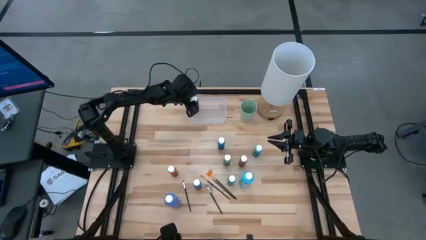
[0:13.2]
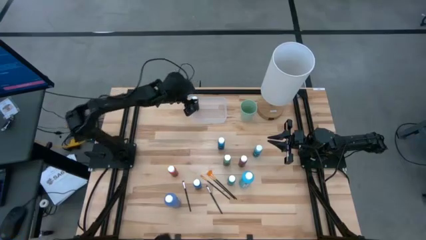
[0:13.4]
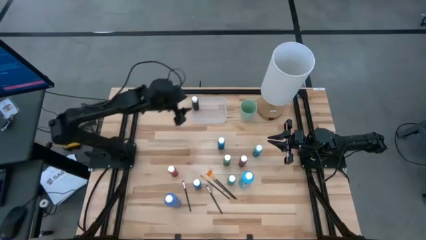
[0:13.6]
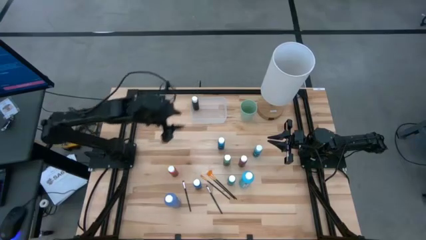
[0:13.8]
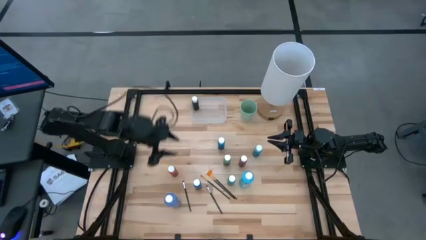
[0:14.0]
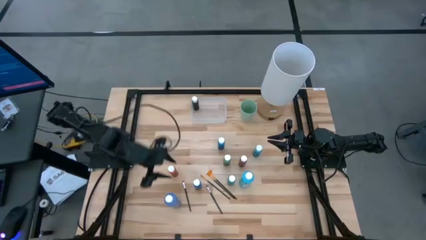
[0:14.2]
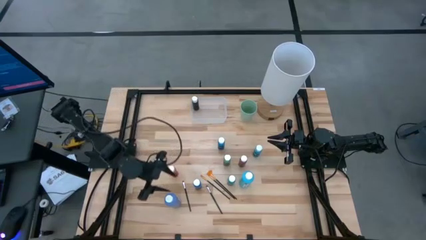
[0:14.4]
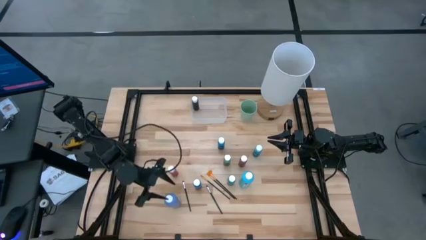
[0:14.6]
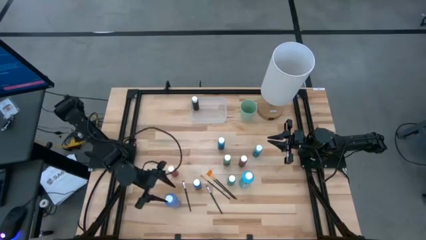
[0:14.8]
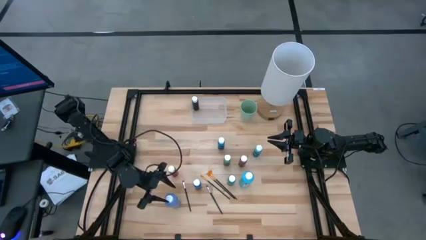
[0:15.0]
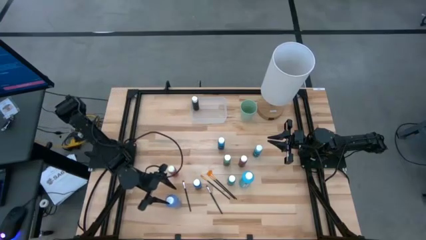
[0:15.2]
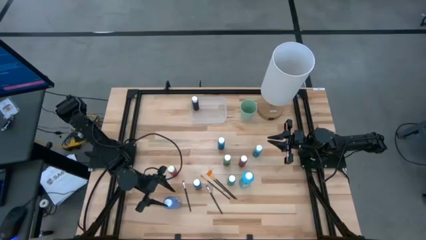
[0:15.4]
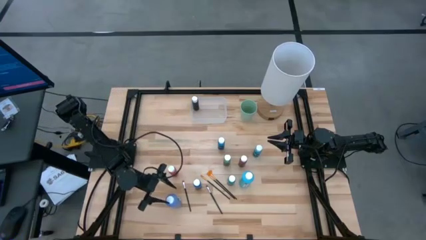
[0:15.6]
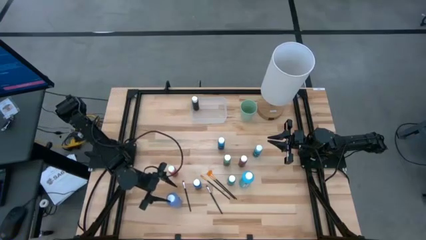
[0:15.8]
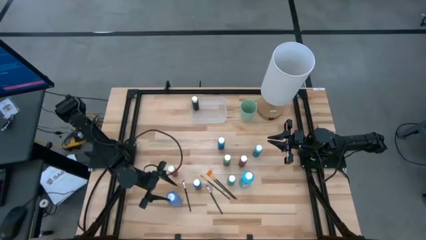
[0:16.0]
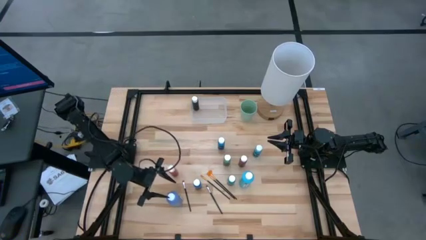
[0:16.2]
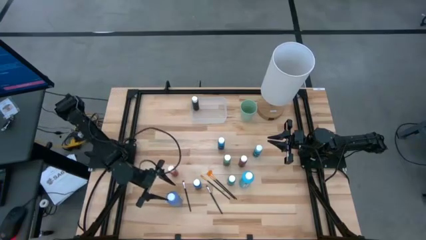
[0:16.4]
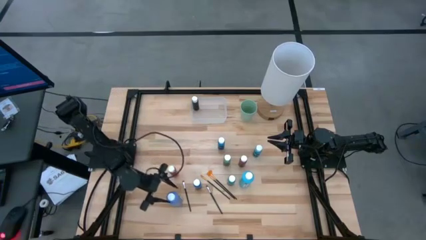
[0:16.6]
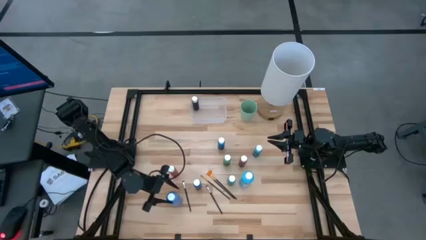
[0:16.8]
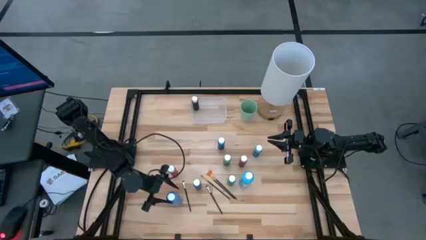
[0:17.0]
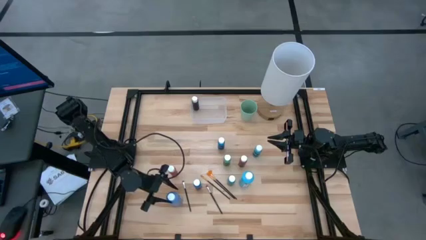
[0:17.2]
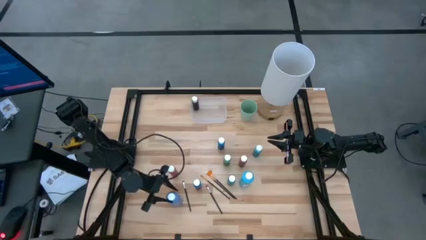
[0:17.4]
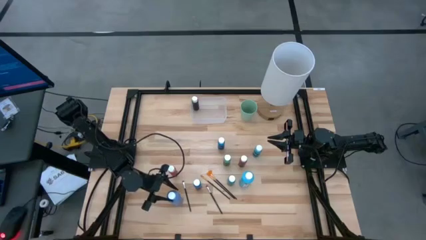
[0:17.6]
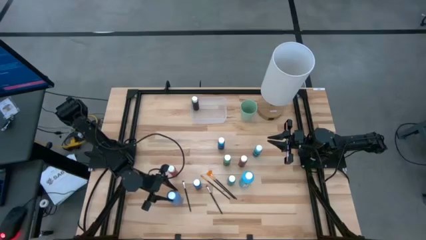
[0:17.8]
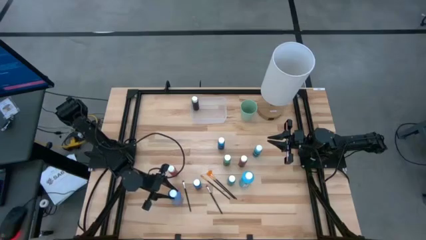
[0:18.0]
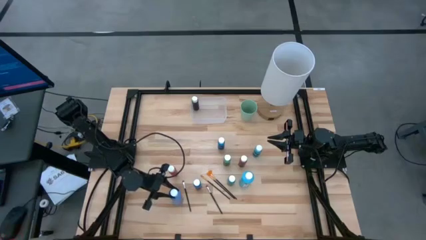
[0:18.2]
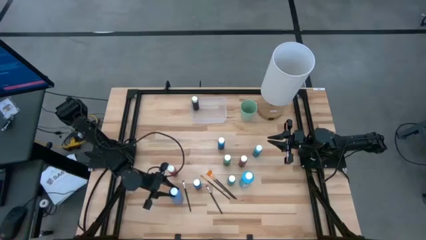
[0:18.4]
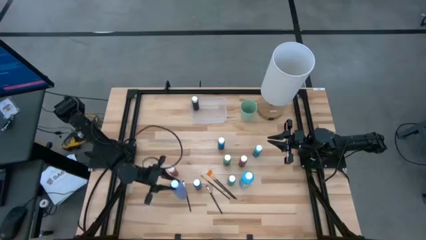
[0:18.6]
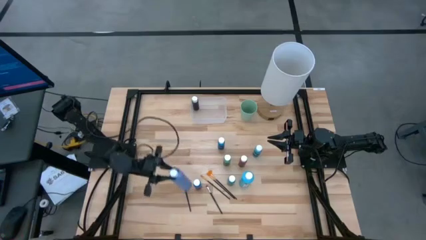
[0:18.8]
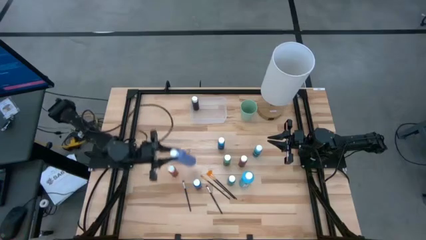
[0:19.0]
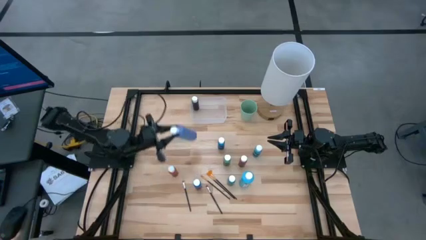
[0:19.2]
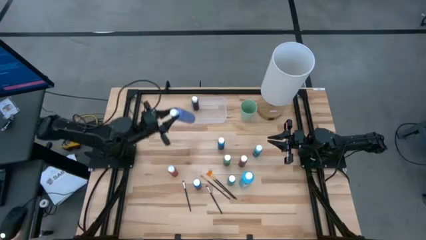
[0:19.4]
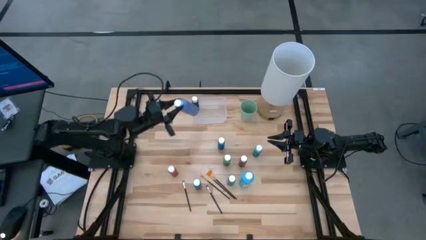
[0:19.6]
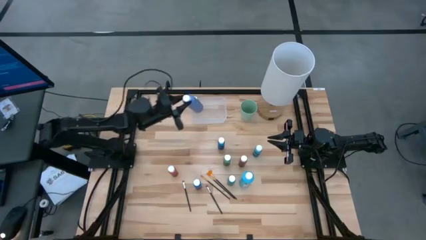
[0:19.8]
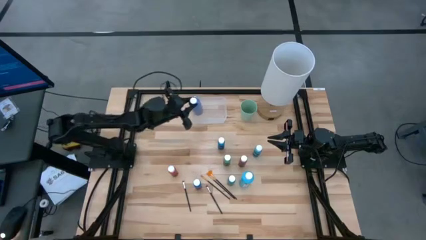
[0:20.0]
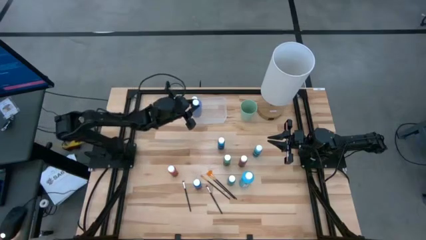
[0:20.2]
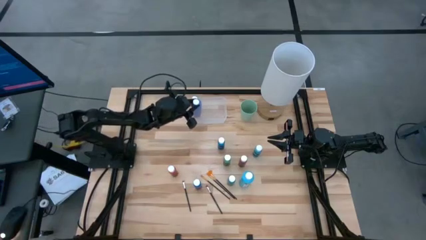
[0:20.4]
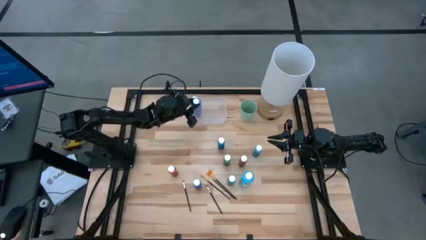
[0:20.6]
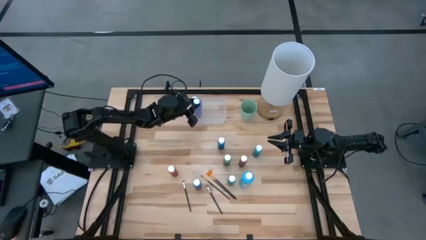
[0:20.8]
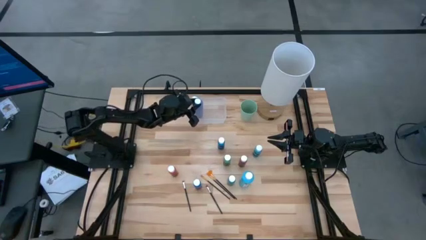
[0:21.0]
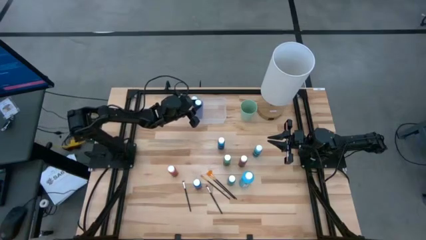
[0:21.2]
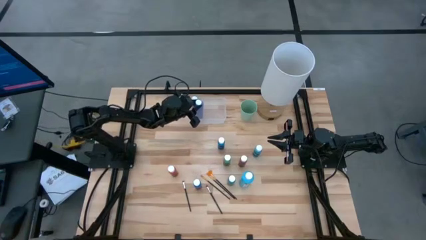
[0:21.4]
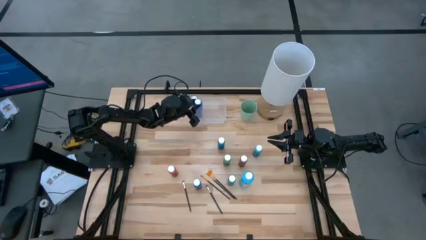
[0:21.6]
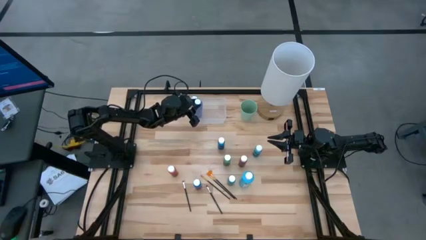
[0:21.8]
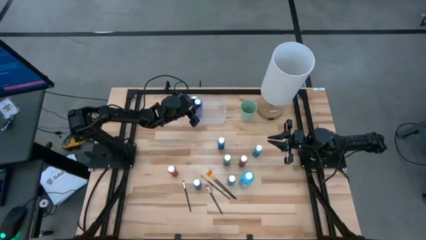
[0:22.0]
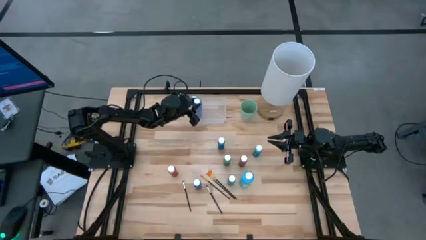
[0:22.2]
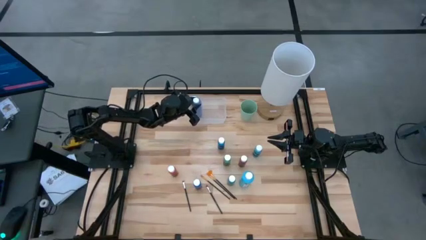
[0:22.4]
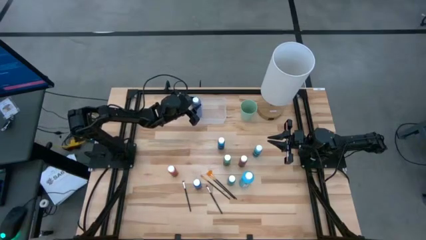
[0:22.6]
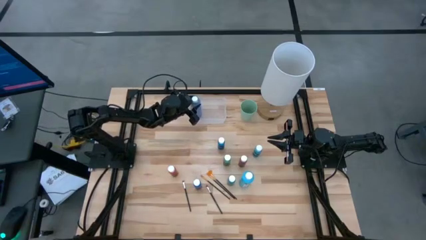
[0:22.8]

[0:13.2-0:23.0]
Task: Pick & Place Paint Supplies
Put the large blue paint bottle into the transparent bin

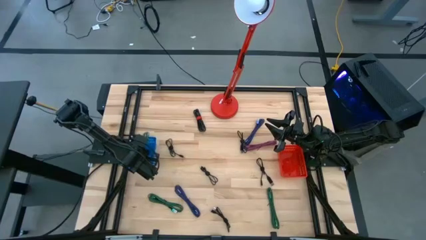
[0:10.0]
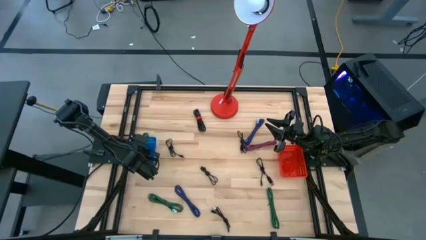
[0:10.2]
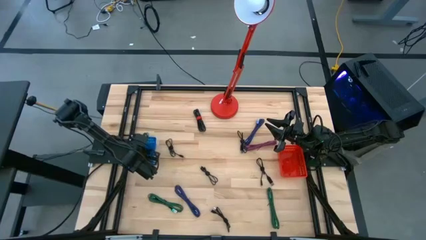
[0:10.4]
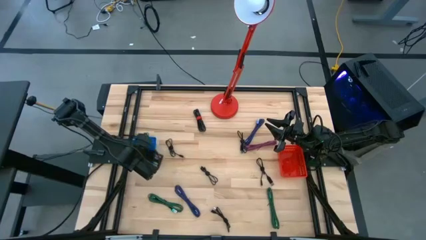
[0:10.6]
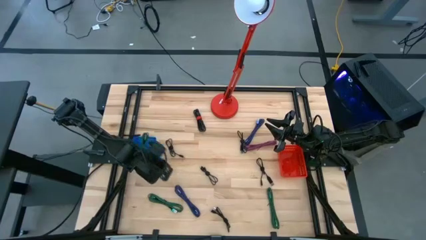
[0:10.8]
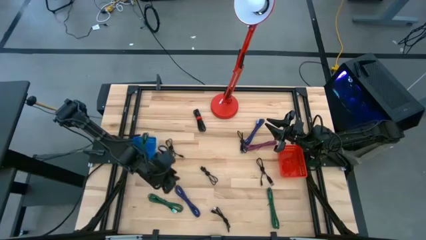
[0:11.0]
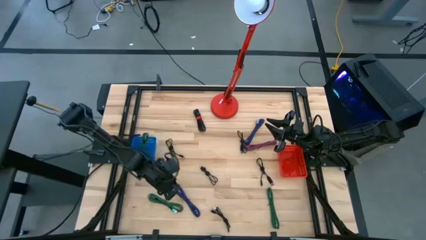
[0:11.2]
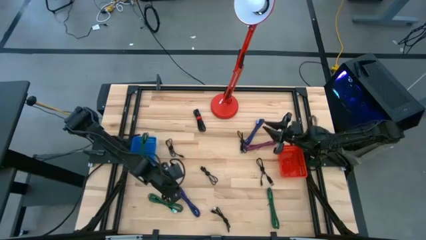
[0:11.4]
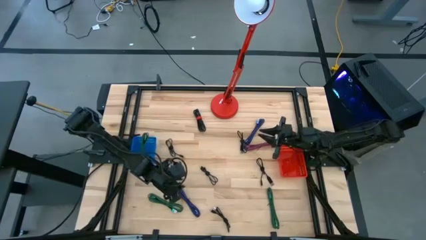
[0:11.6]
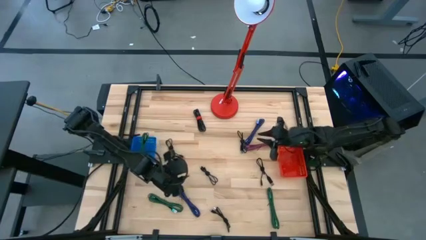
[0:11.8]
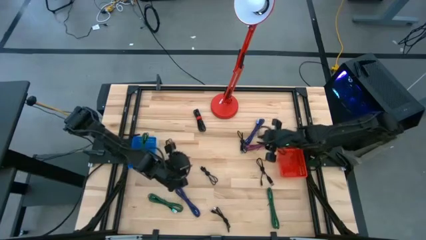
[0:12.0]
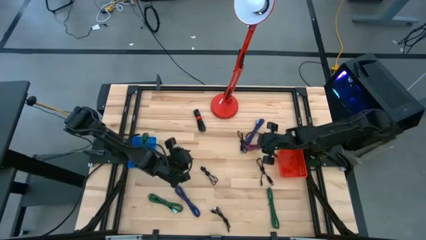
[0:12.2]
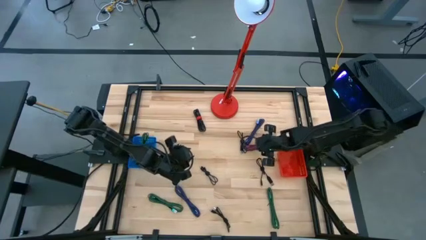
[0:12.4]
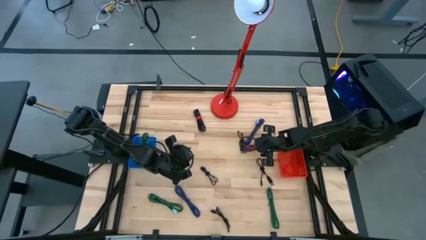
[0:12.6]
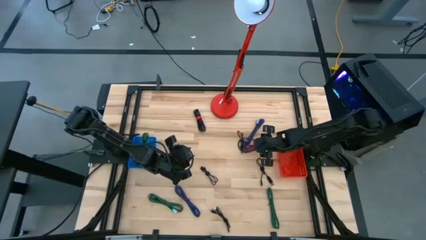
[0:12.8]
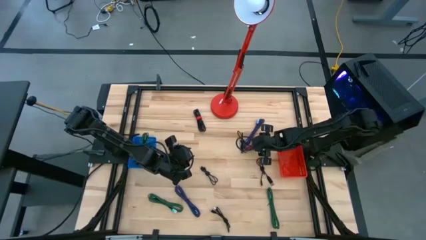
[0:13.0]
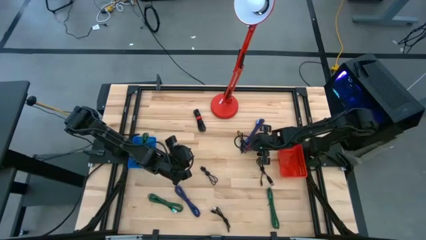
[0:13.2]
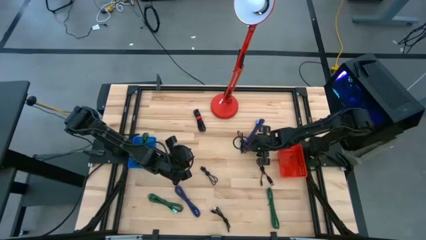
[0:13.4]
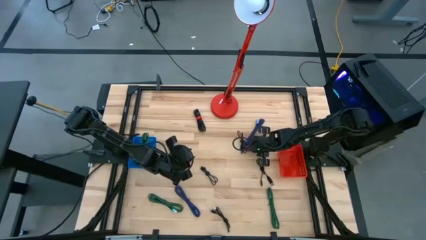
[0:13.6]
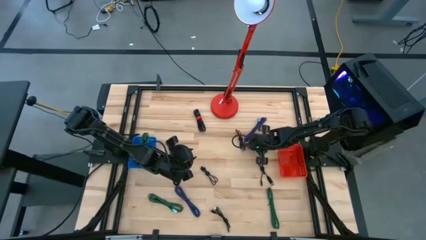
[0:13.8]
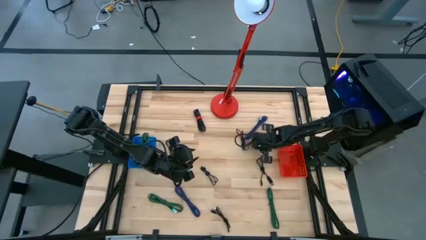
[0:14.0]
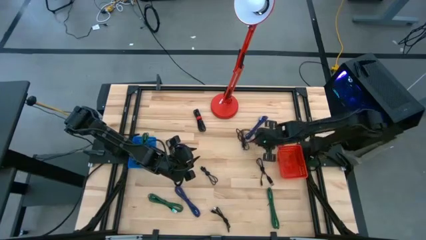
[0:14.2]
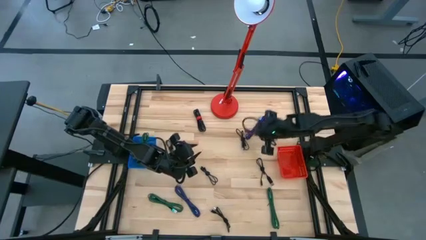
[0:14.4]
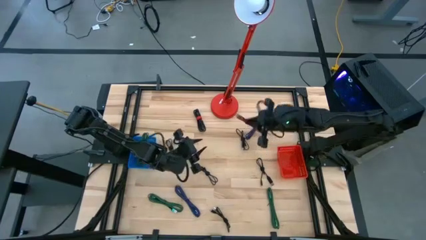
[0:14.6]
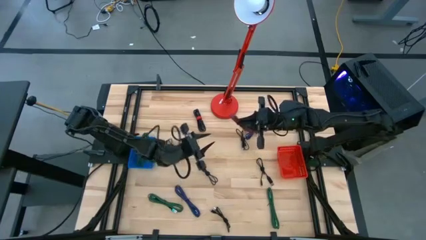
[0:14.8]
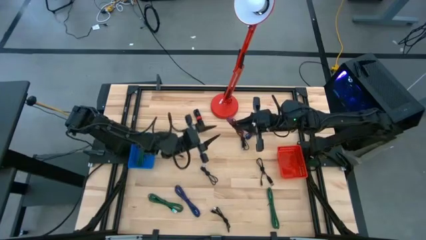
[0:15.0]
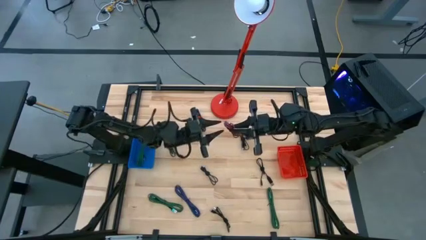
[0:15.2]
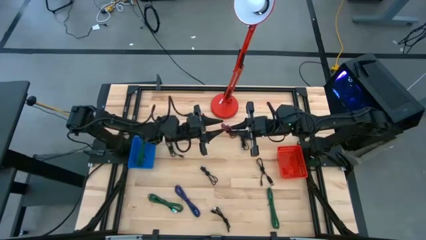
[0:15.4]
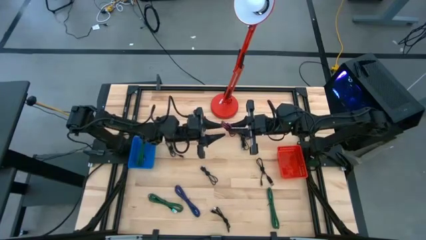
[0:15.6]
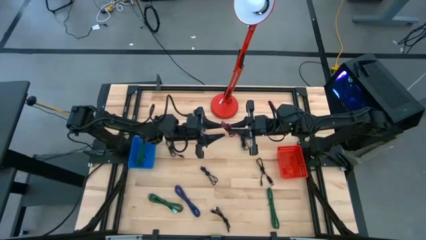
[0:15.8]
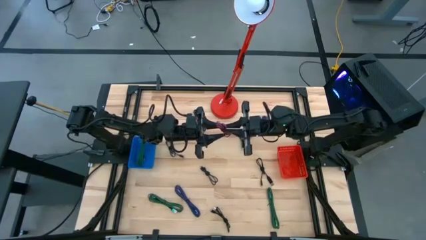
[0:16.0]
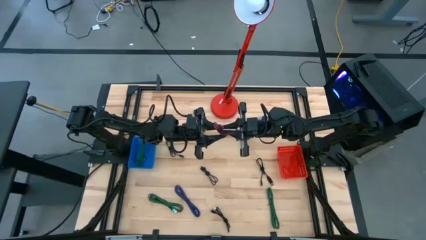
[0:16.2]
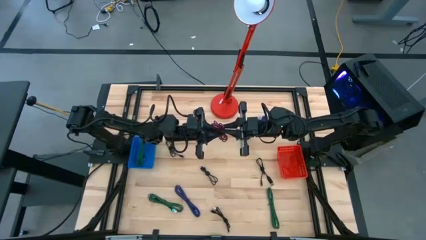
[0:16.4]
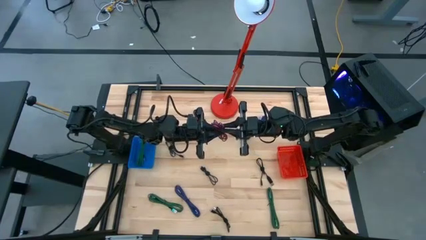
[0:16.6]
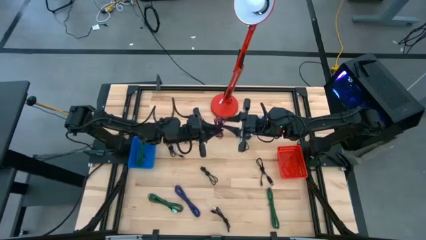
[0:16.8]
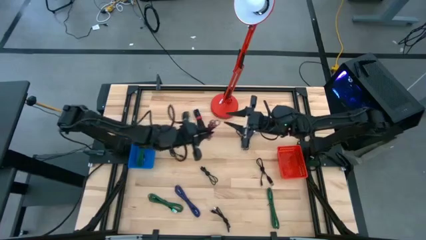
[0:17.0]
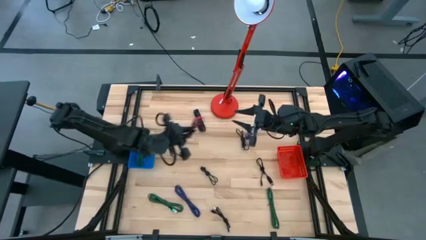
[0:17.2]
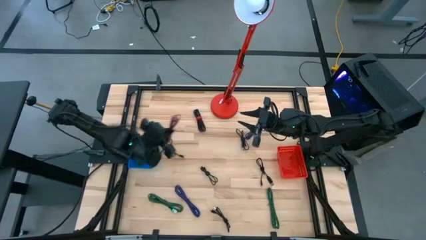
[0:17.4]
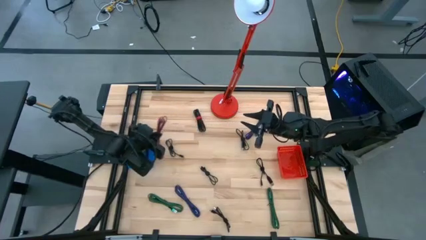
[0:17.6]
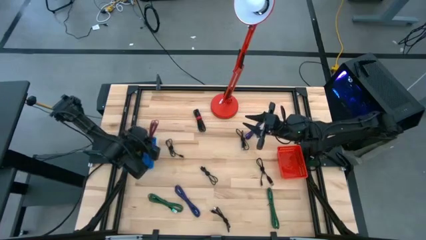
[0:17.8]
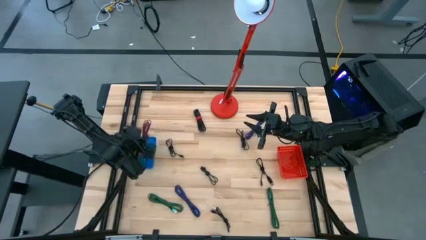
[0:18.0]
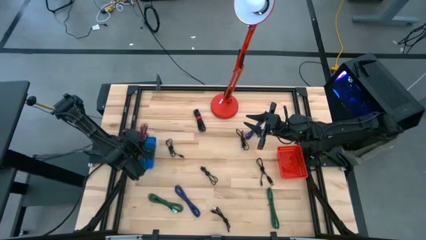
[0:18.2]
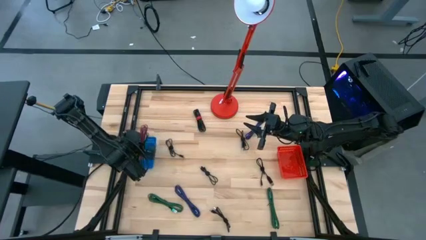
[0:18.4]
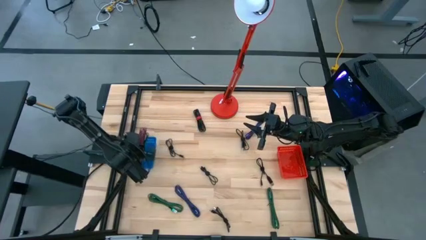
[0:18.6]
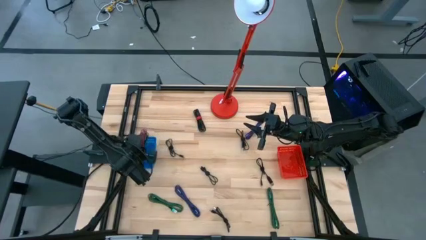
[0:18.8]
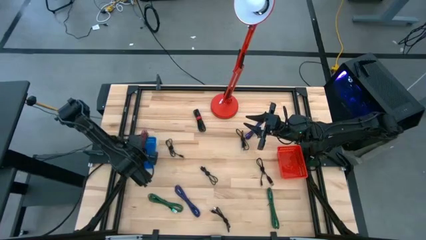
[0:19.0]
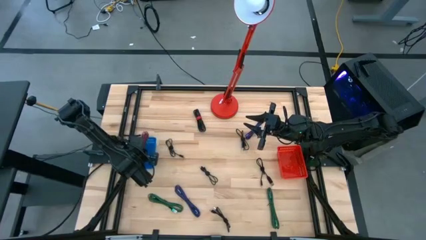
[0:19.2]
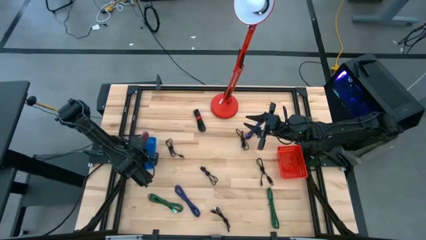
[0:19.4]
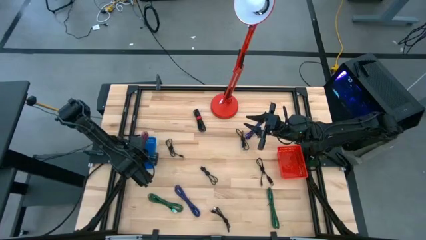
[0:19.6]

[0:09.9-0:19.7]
Task: Pick & Place USB Port
Put the pink and black charger cable into the blue bin
